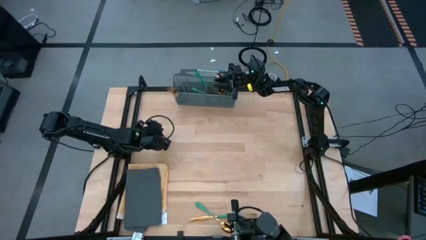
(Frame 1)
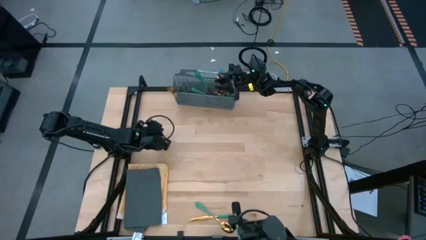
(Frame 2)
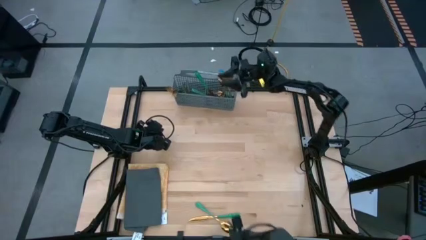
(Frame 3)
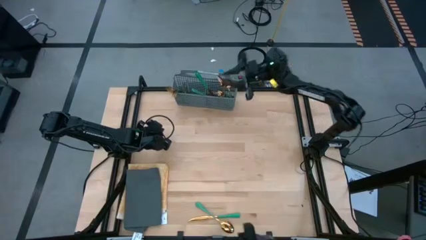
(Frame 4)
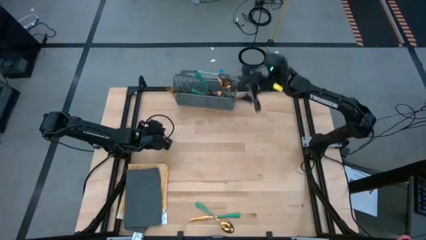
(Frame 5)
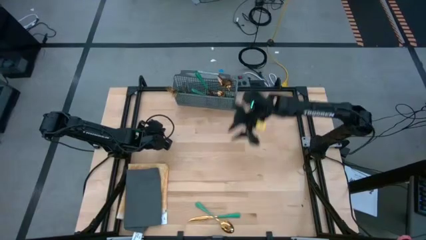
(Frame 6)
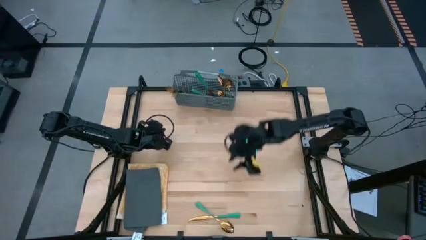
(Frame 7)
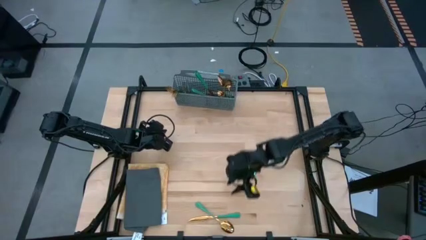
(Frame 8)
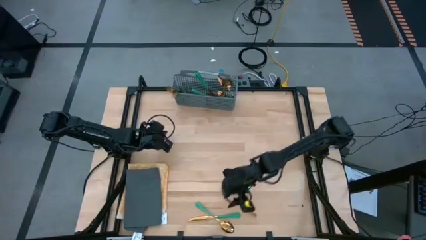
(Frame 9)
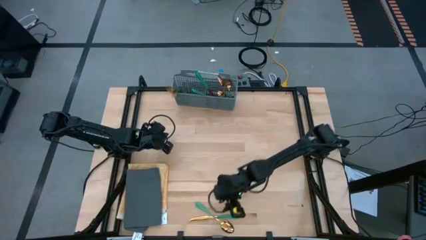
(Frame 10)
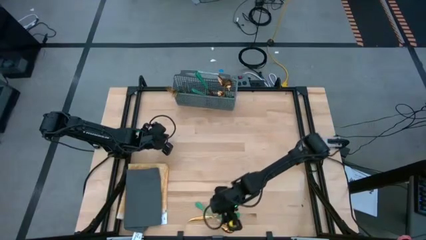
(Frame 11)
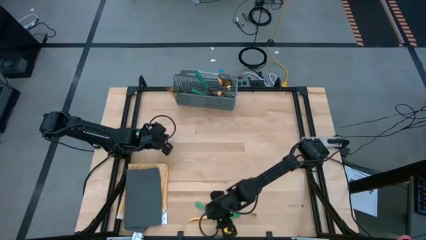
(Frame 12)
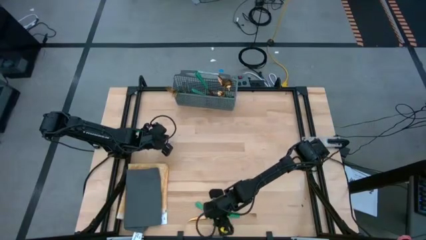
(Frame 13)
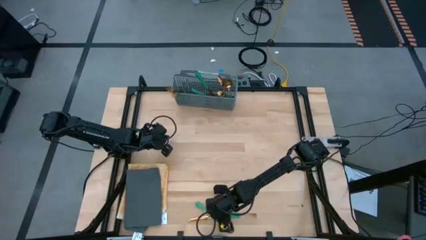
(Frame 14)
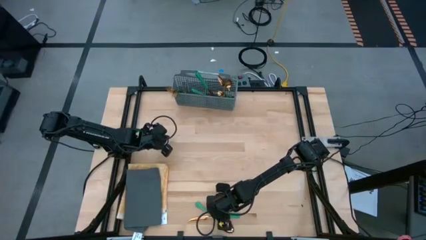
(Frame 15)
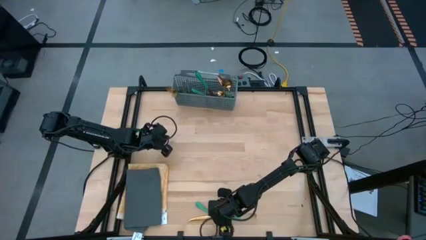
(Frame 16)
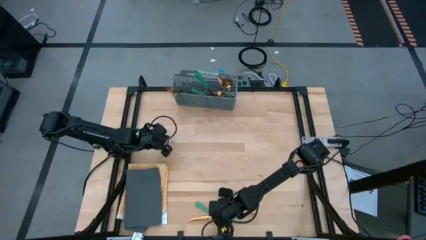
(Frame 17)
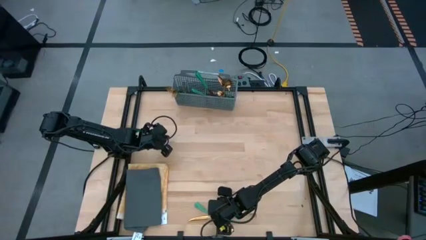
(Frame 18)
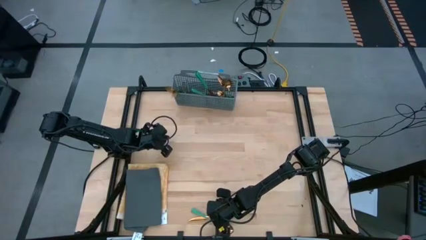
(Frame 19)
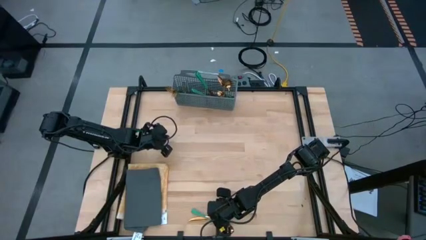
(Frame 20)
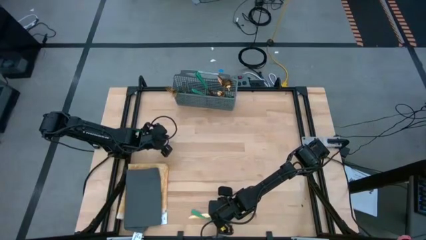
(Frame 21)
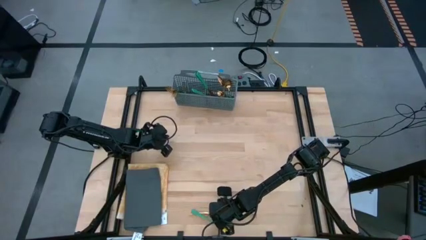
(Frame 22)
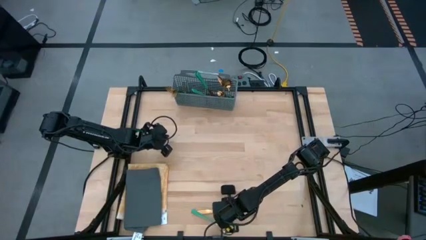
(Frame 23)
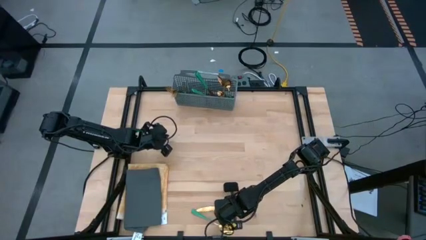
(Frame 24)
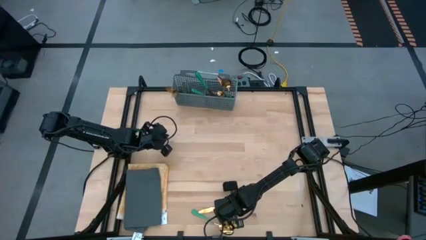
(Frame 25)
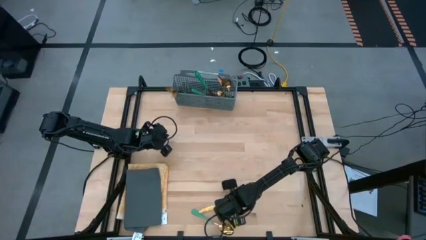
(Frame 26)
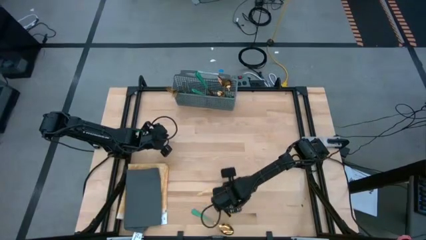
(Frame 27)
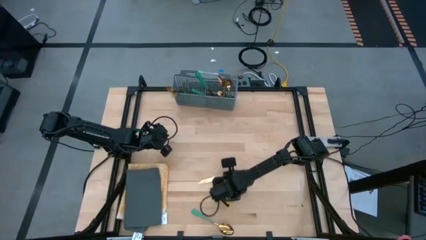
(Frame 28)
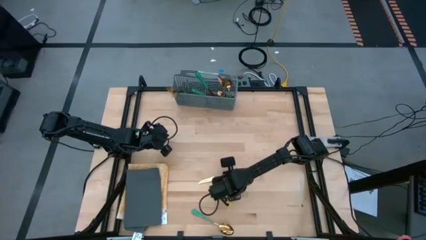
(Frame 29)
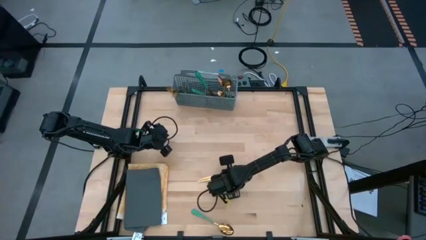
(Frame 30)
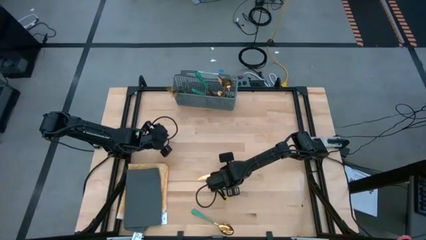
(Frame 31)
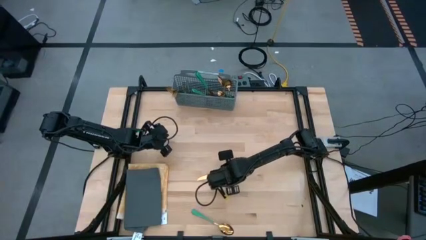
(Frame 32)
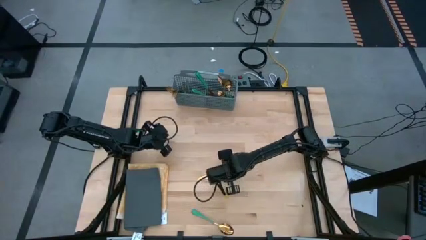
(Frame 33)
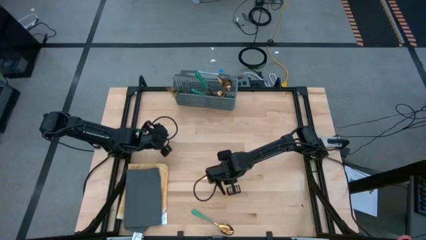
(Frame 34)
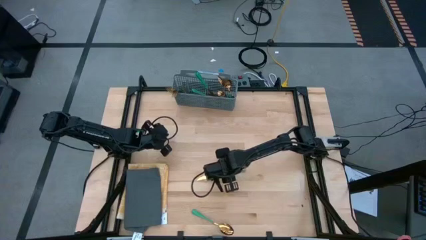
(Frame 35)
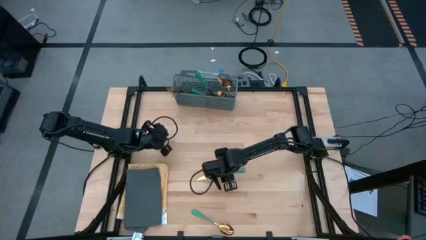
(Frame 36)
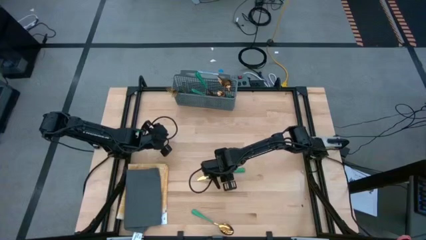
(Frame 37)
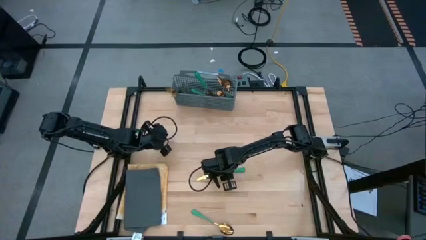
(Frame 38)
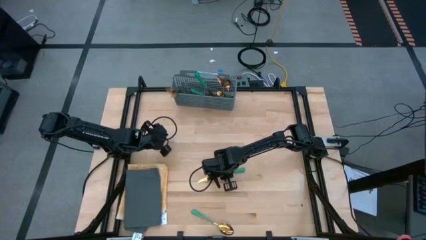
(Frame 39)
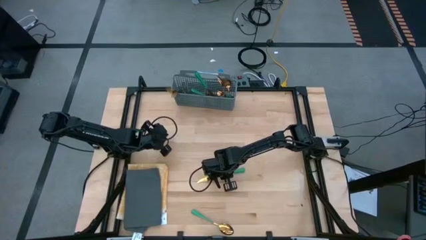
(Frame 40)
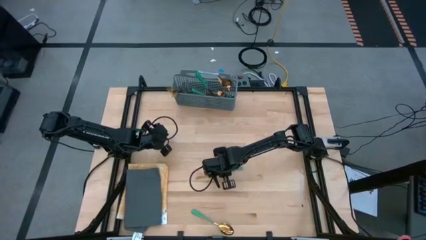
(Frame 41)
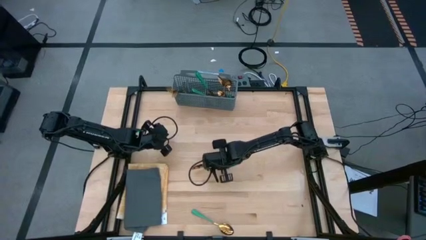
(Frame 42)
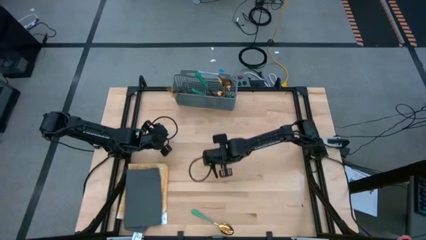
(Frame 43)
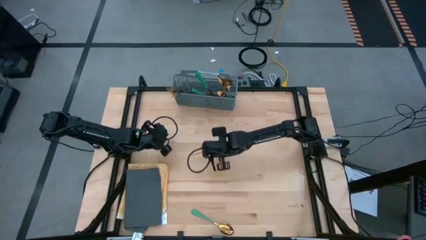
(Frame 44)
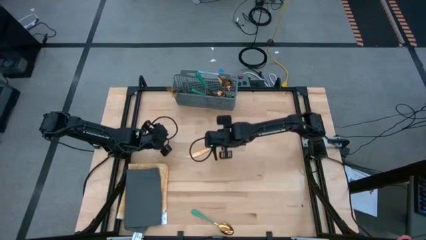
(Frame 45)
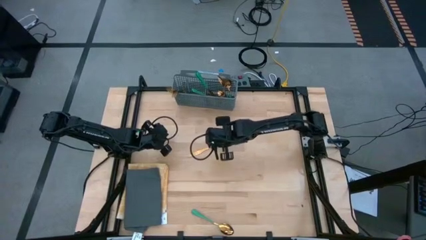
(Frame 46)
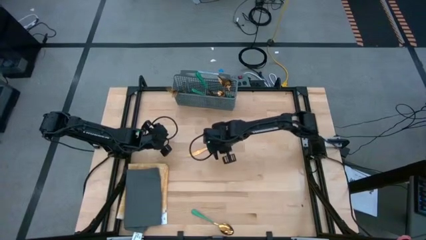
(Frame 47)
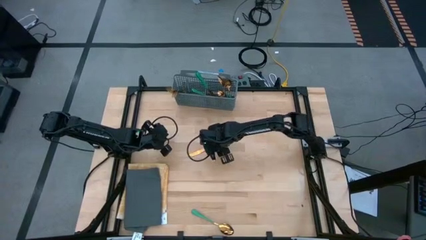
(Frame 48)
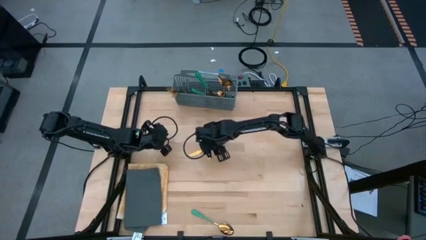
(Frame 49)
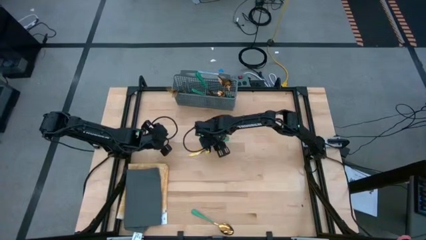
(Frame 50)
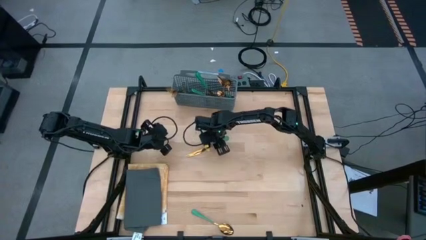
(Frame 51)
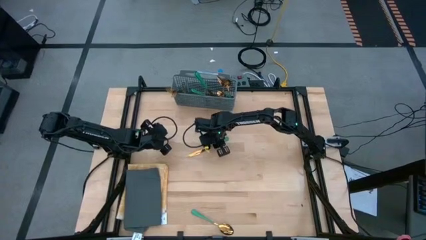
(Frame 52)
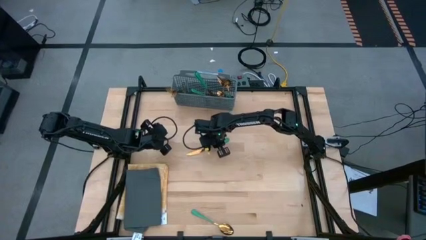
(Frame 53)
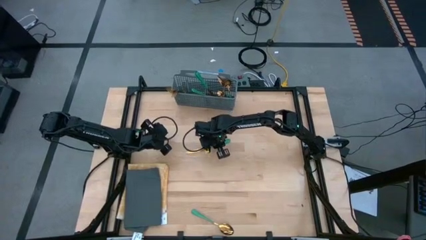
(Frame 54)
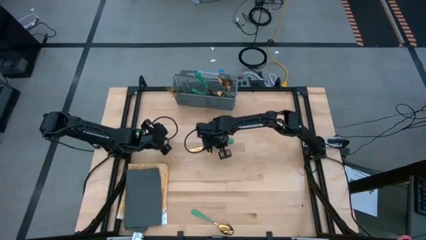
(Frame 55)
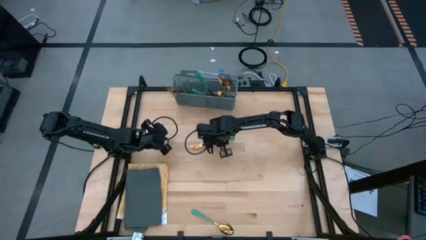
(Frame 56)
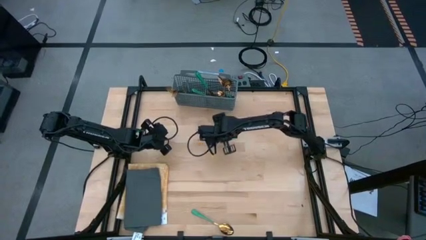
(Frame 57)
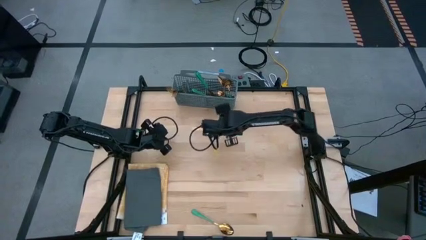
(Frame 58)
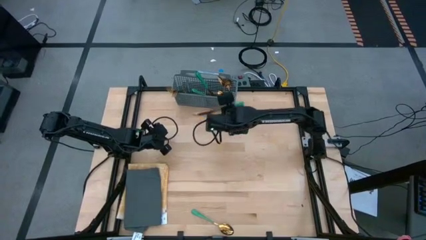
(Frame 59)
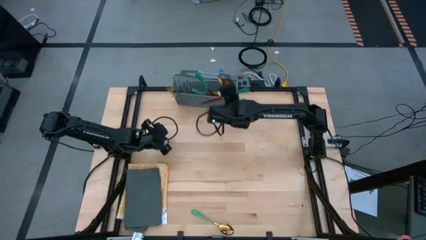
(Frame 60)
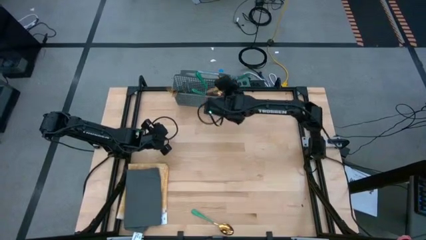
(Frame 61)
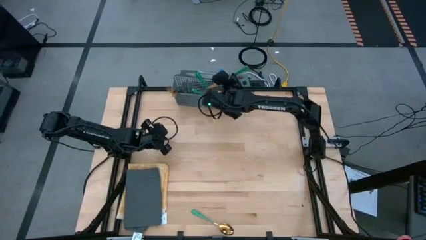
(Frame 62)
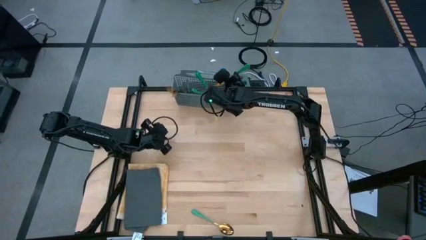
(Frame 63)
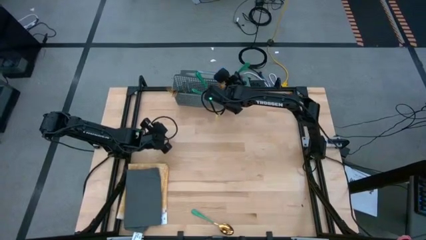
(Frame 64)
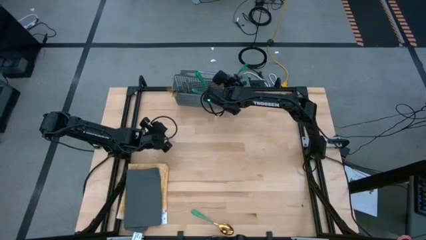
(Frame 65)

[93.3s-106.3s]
Task: Sort silverware
Put the green table knife into the gray silverware basket

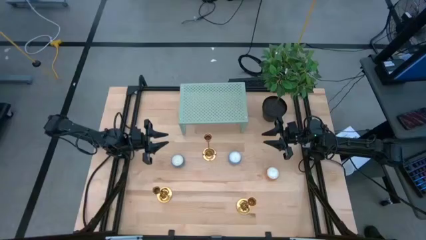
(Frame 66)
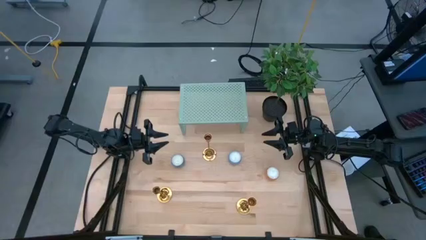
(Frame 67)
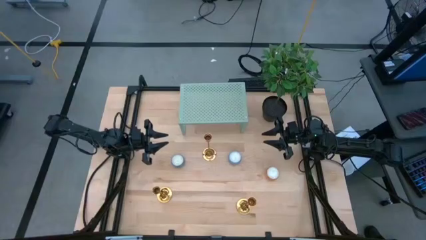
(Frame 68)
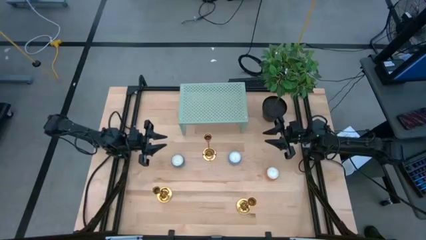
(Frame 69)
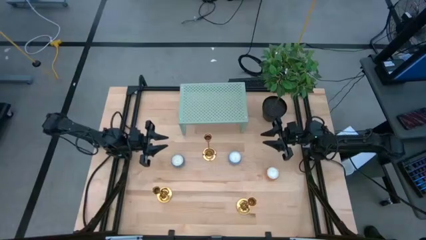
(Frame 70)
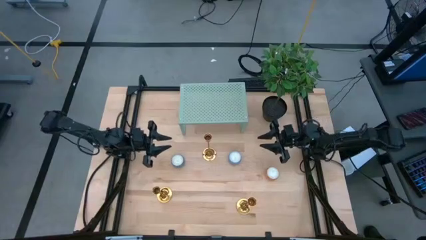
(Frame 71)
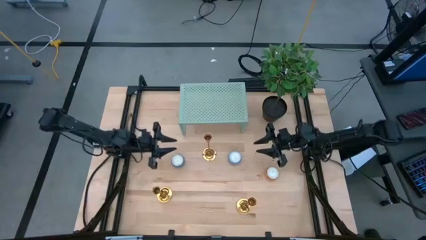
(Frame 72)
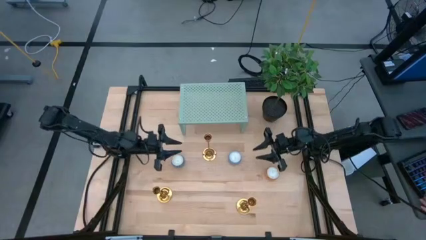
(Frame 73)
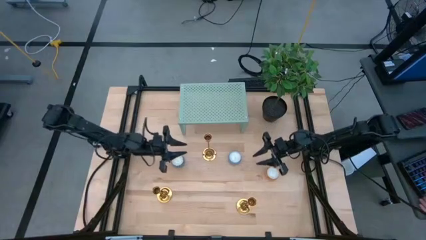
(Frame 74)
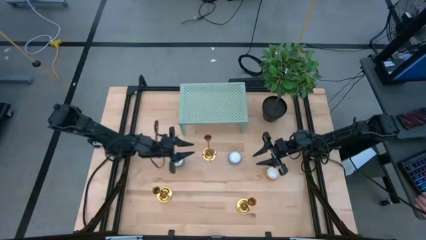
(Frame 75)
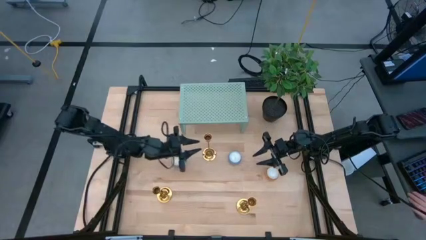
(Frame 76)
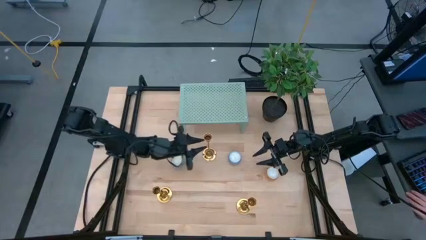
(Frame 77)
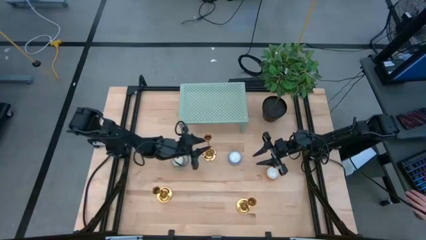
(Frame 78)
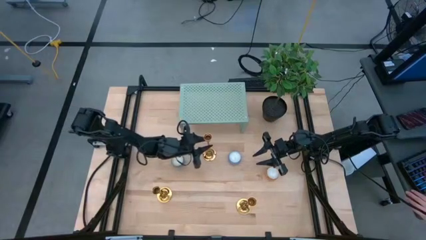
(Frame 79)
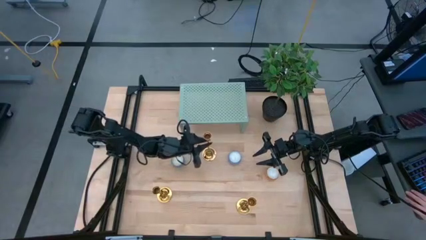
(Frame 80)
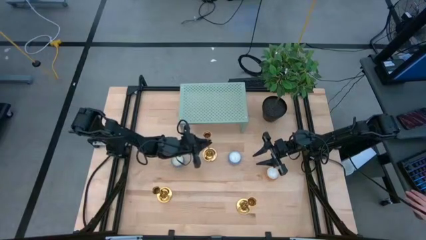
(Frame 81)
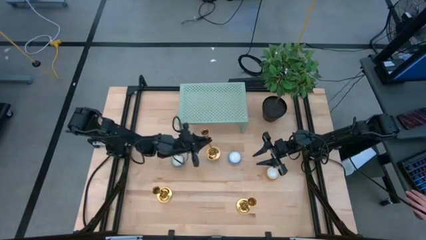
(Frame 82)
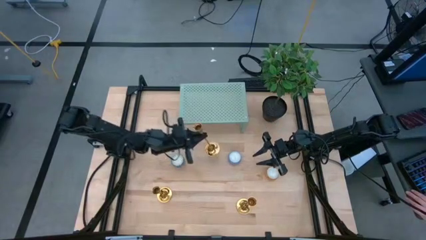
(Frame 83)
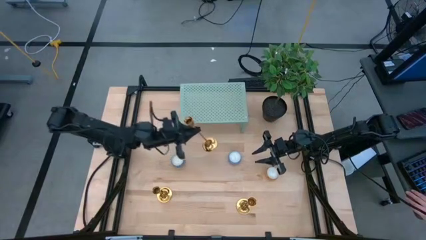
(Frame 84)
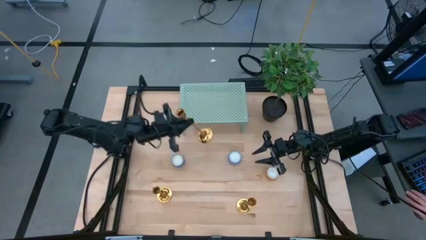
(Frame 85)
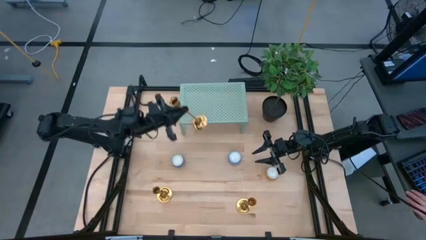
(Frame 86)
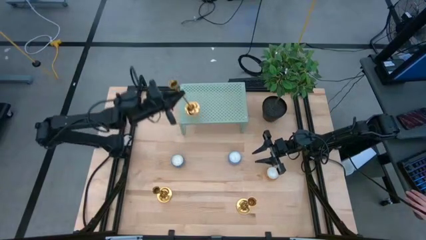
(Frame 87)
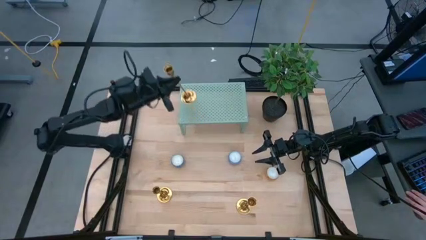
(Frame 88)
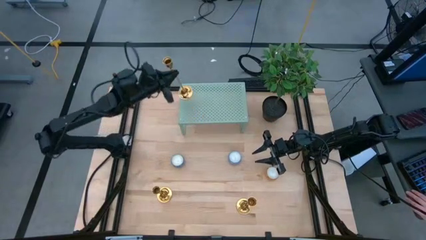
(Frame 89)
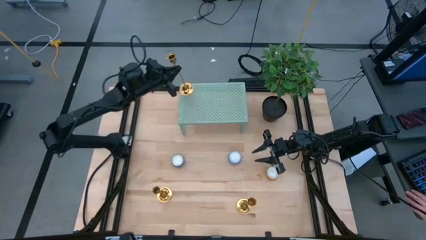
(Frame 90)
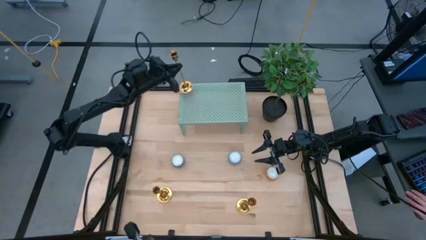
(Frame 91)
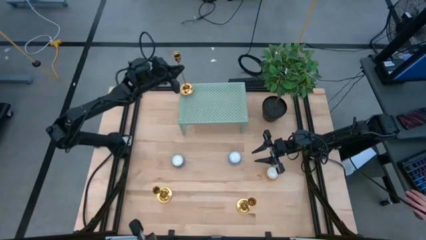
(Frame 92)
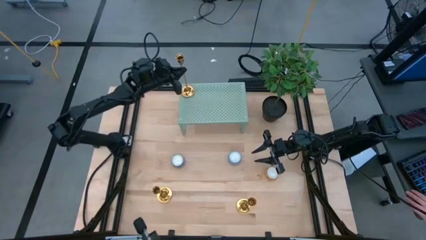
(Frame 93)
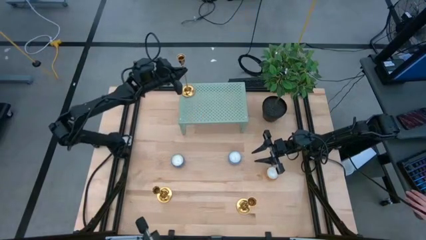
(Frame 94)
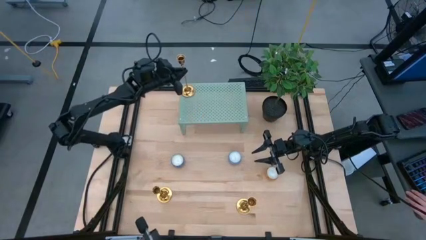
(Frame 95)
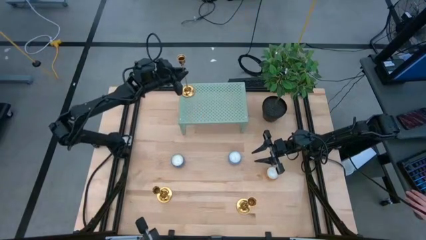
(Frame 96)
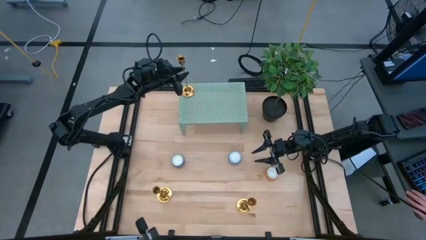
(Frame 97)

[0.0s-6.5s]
Task: Pick & Place candle stick holders
Put the middle gold candle holder on the shelf
